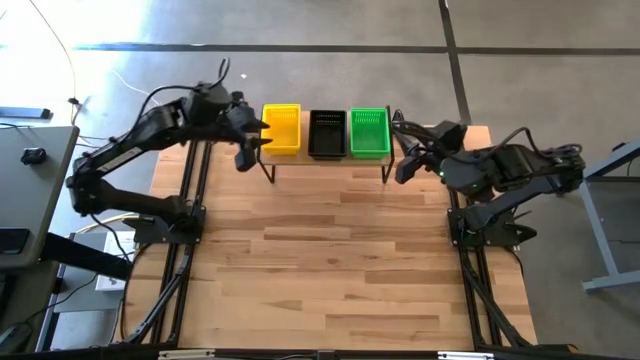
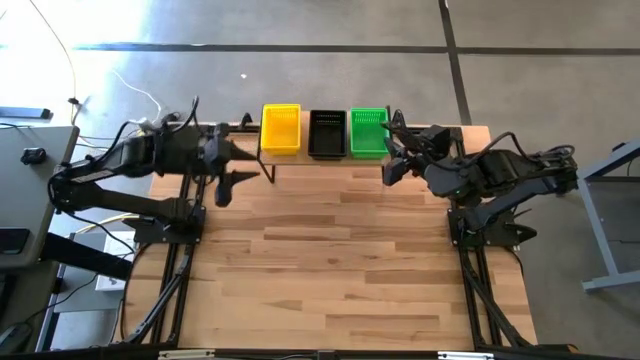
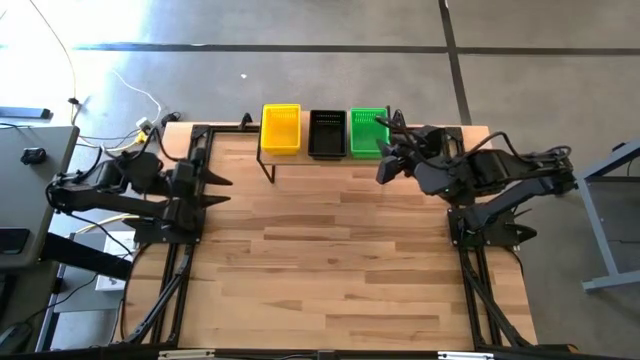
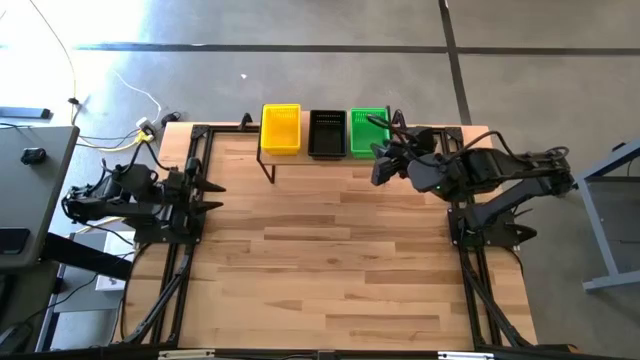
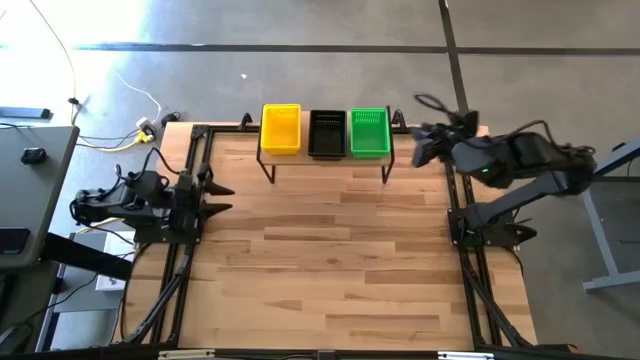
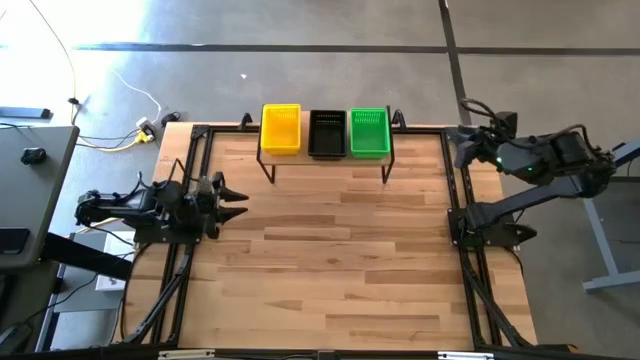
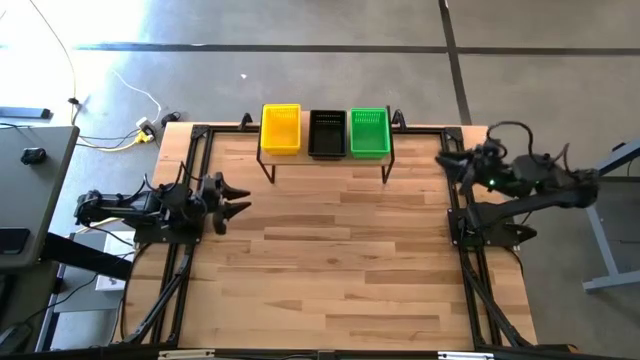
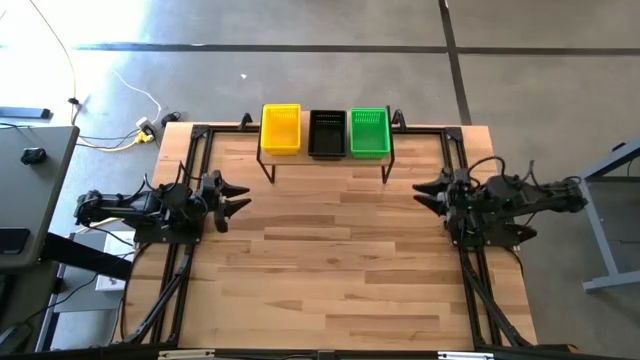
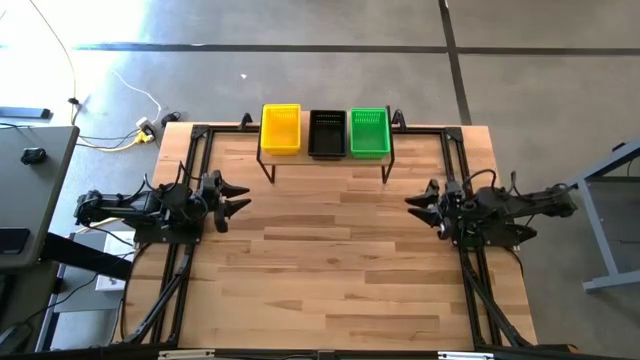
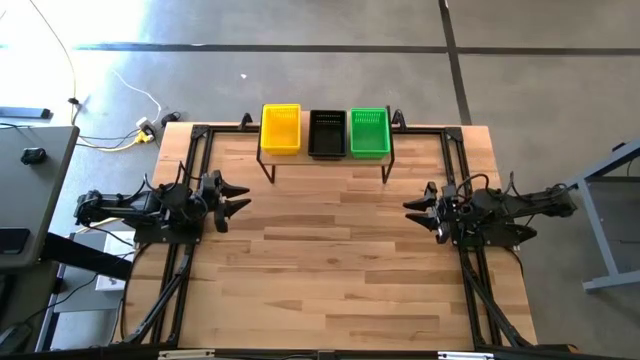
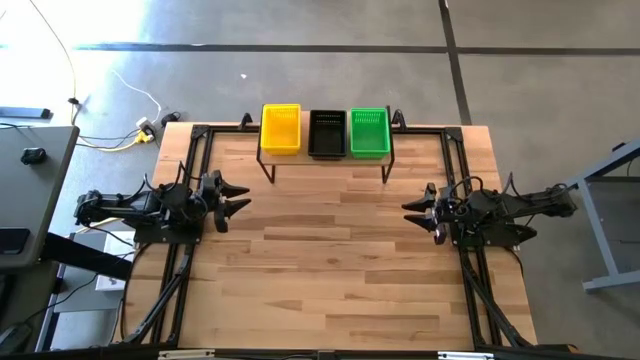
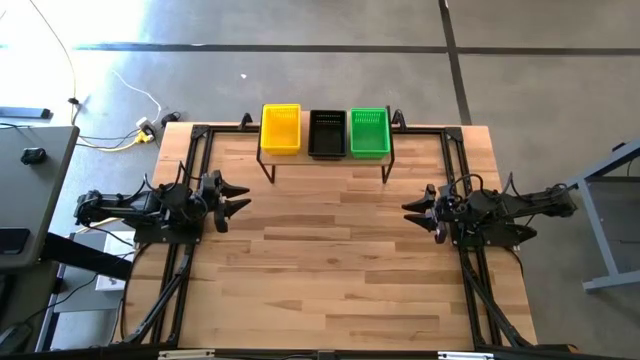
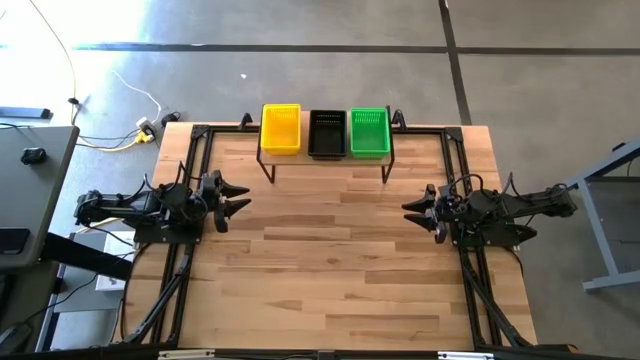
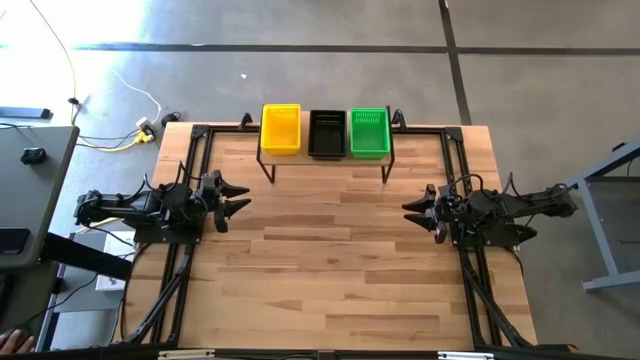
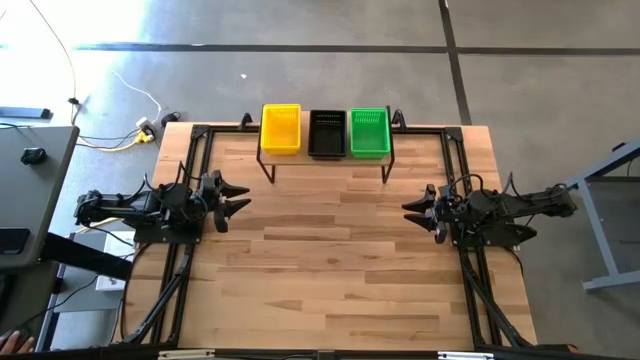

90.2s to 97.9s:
Task: Stack baskets on shelf by color
Return to Home Position

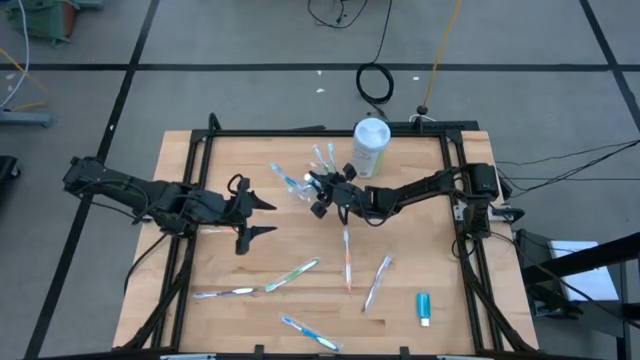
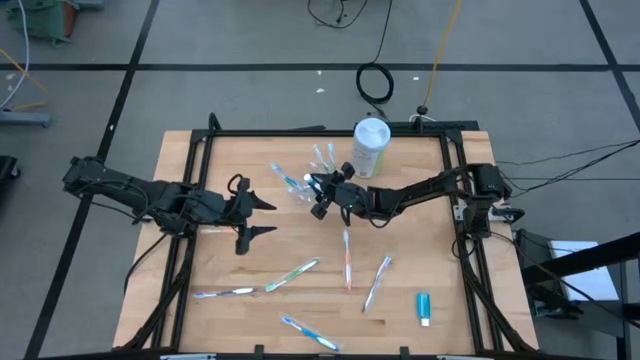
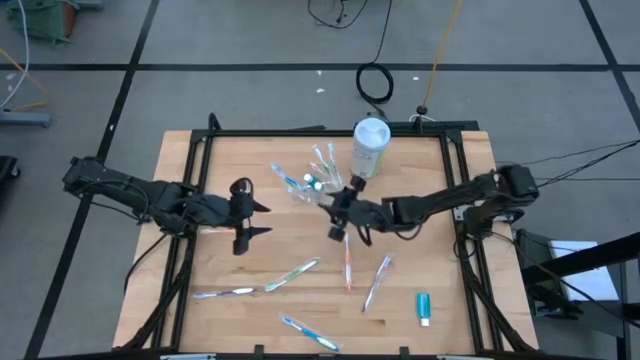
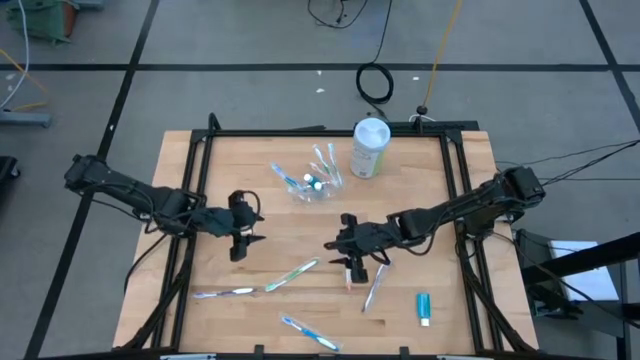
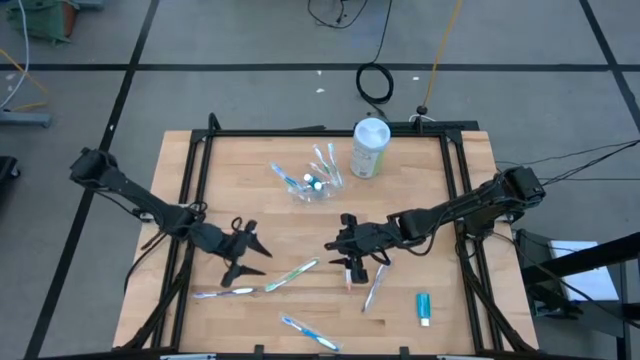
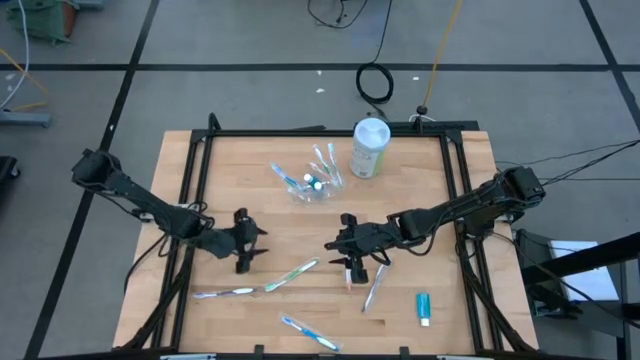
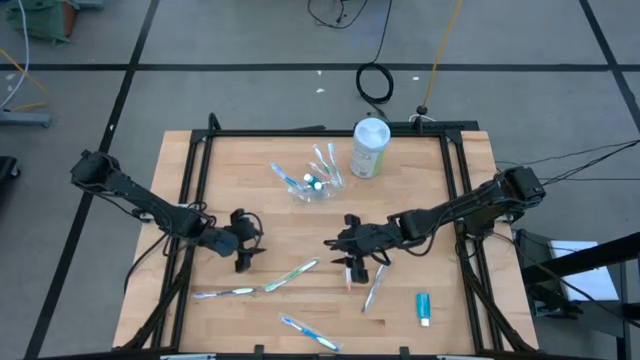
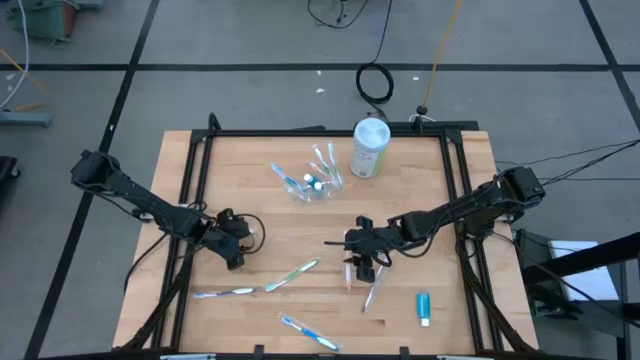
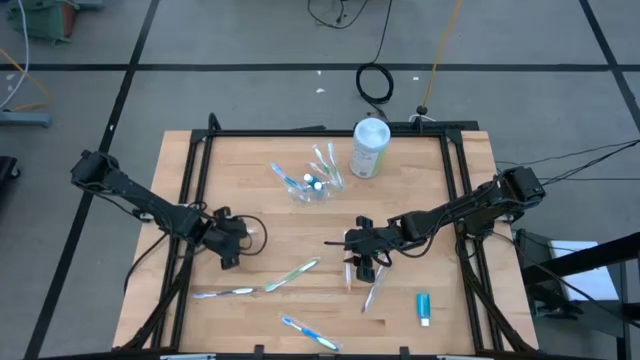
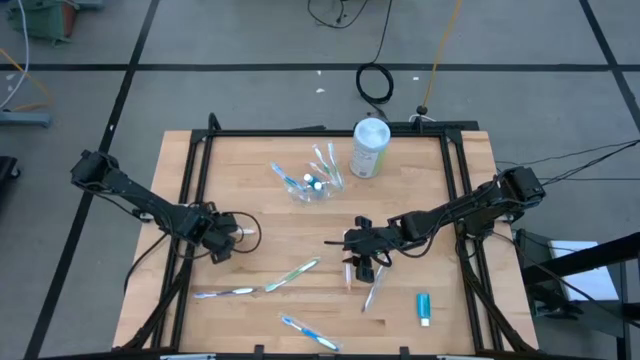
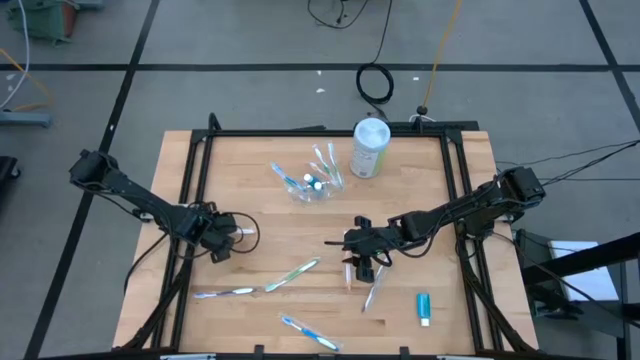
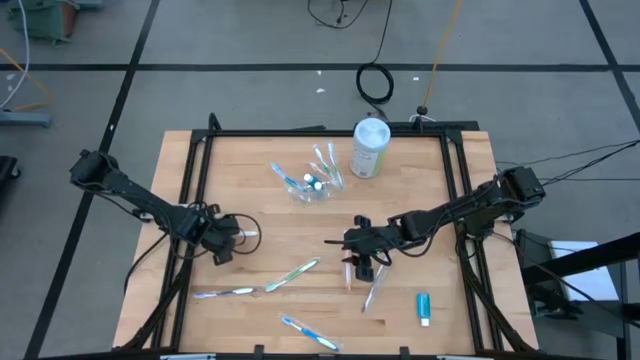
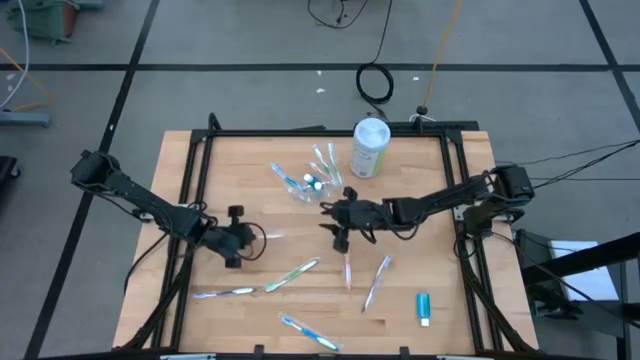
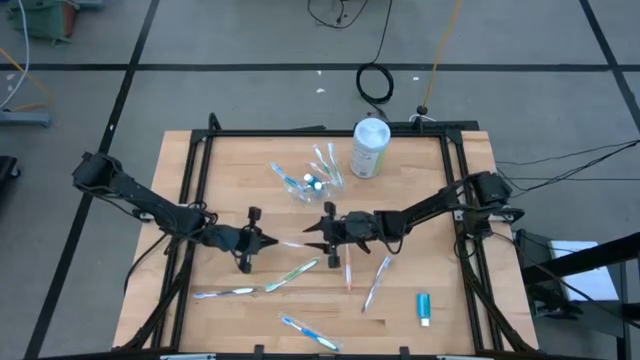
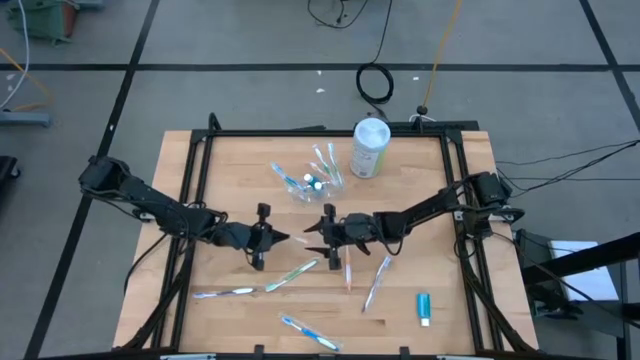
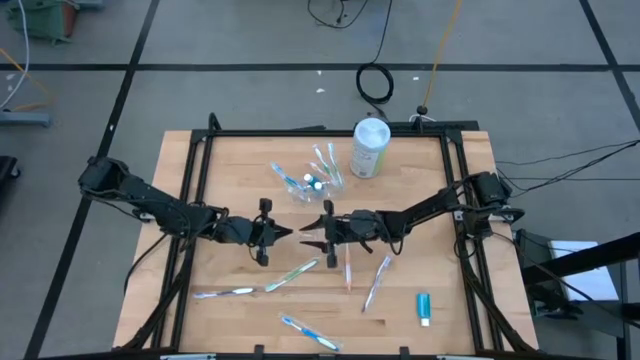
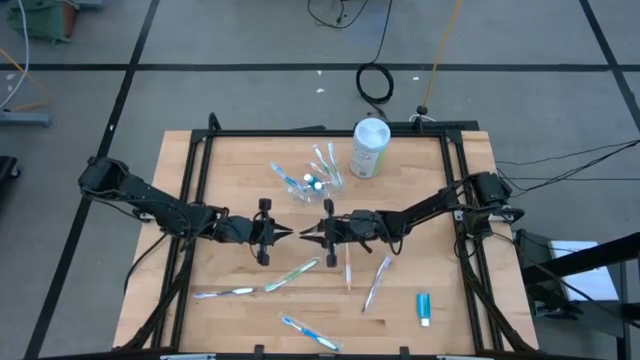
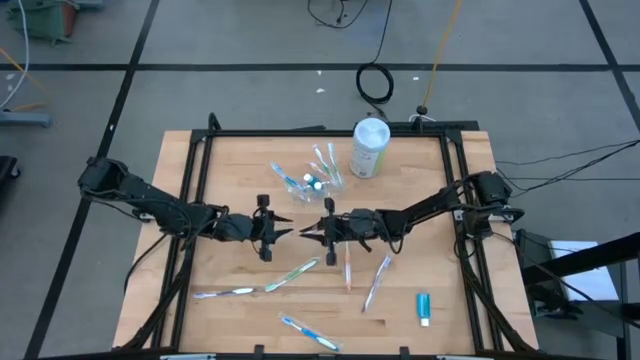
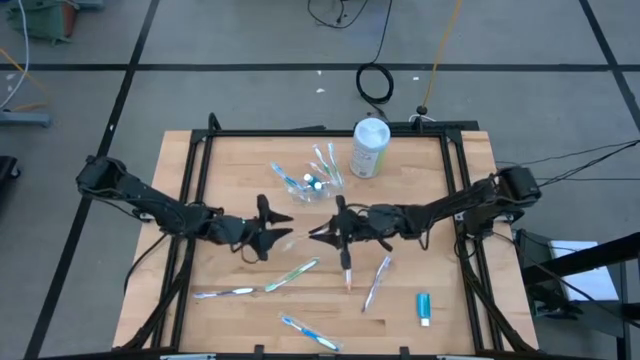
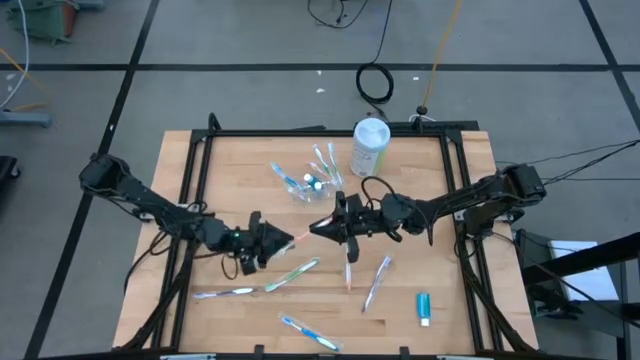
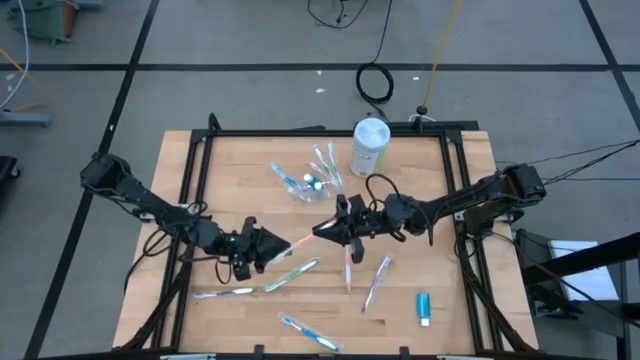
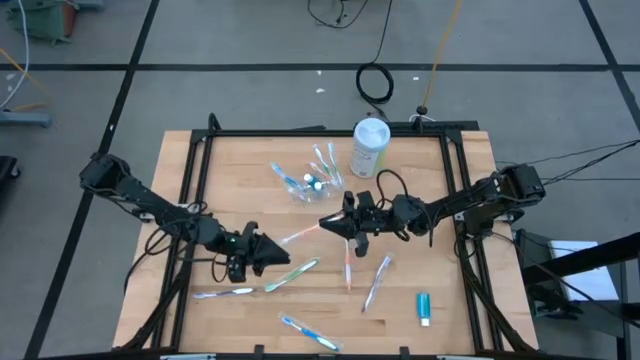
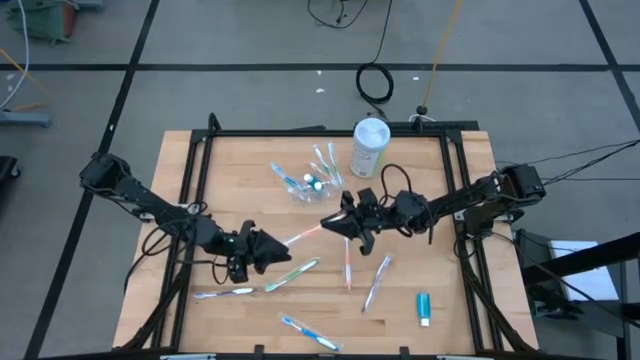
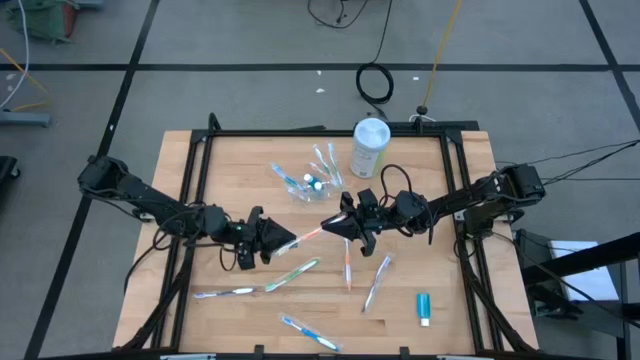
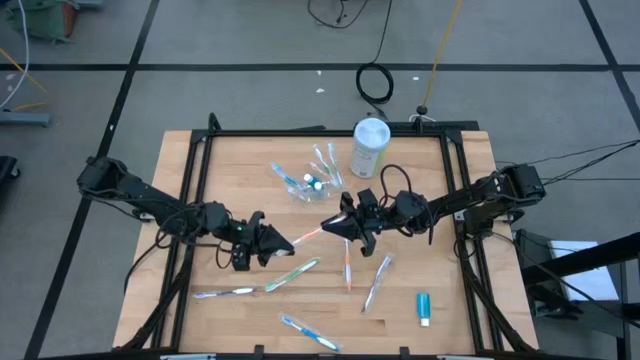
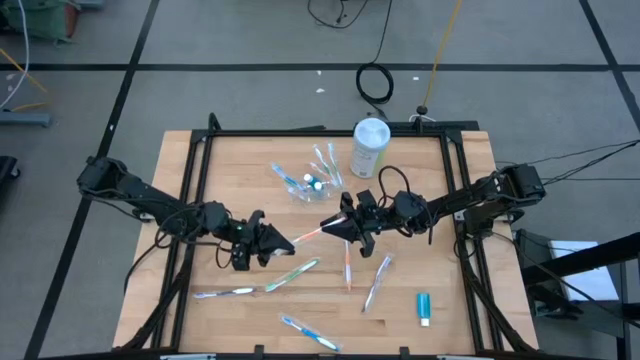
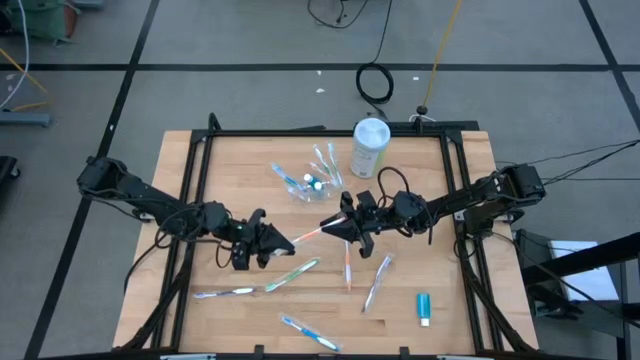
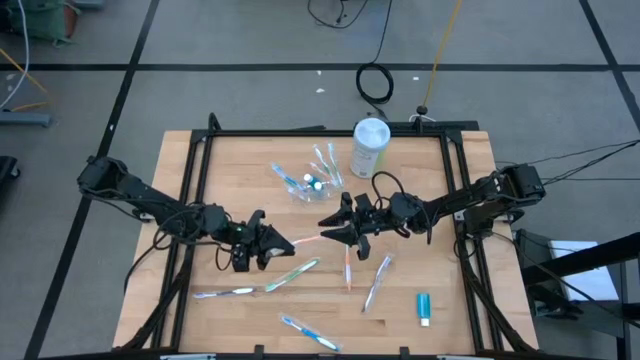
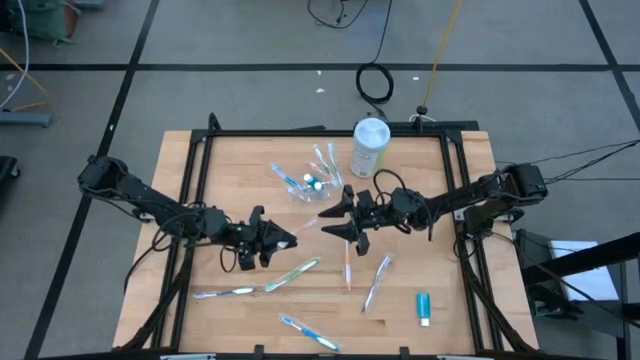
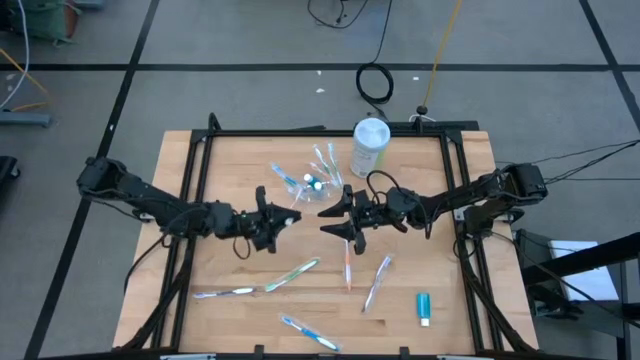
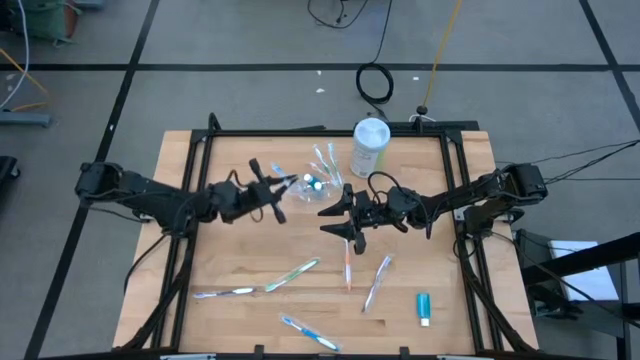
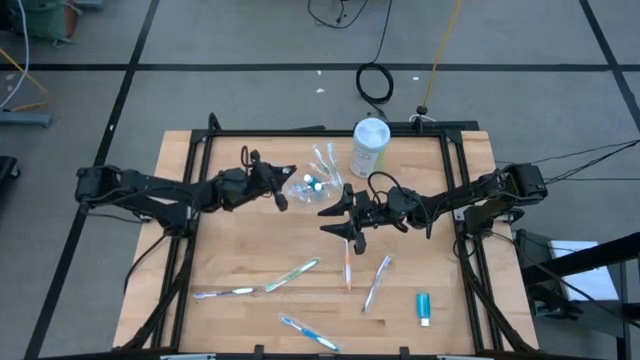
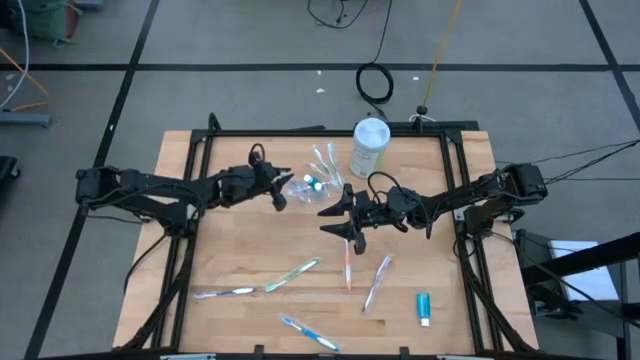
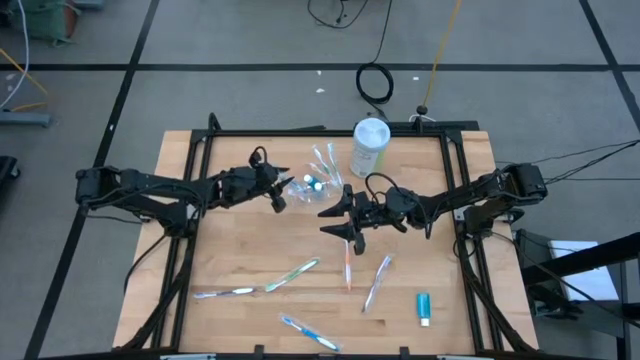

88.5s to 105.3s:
Task: Pick & Place toothbrushing station
Put the orange toothbrush into the transparent organizer
